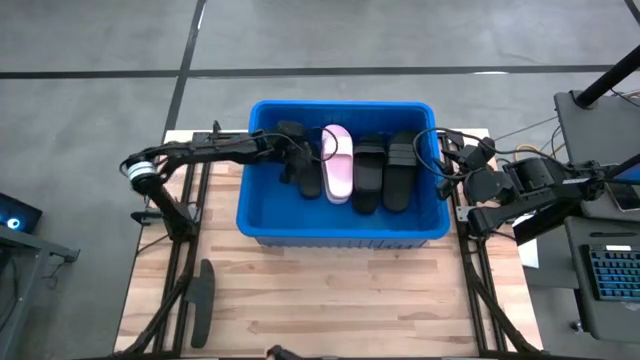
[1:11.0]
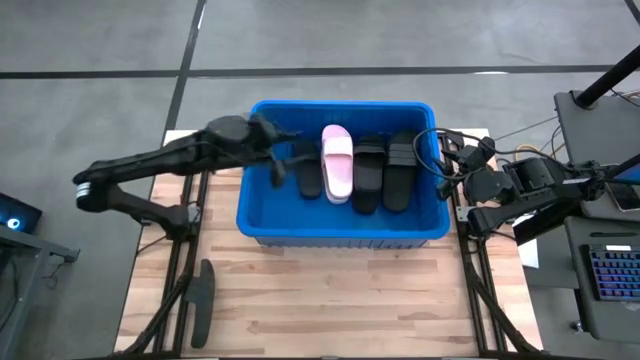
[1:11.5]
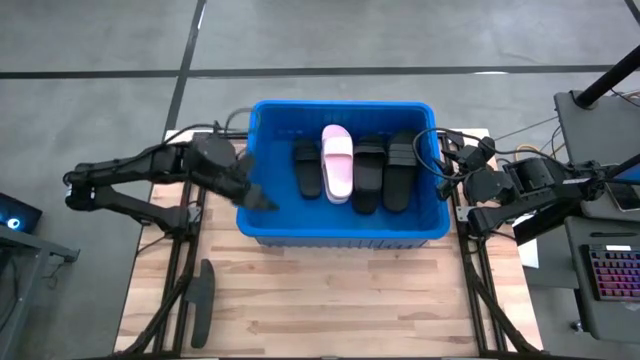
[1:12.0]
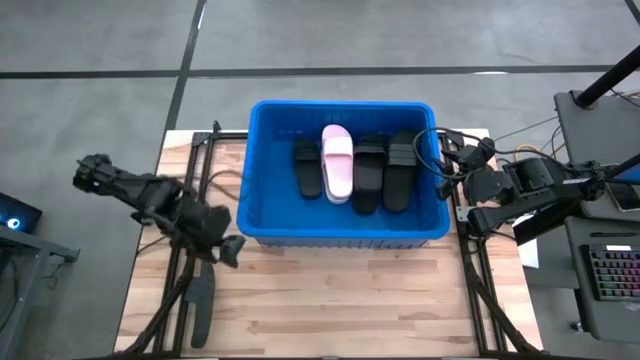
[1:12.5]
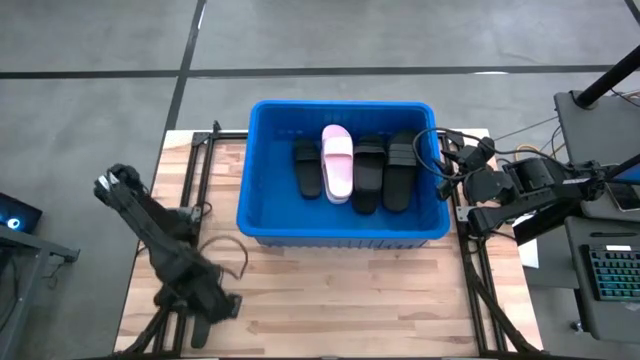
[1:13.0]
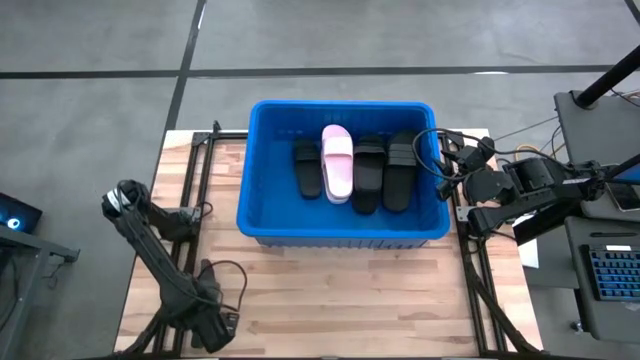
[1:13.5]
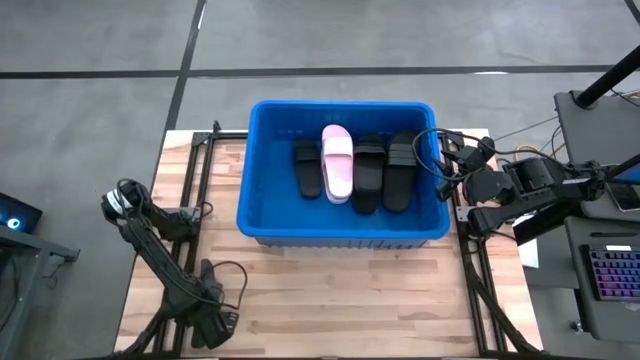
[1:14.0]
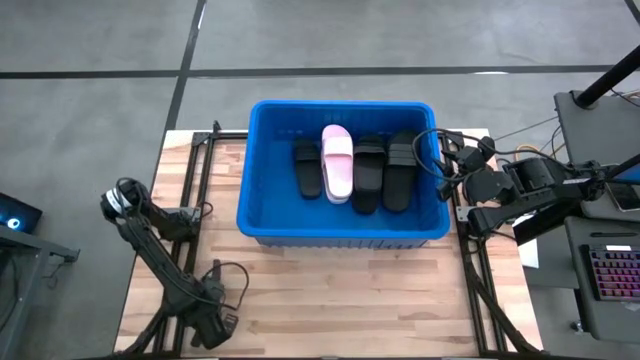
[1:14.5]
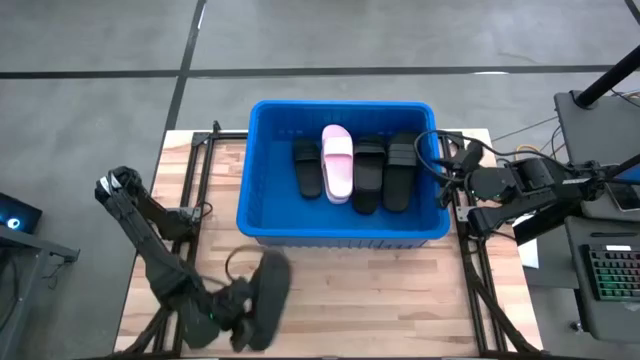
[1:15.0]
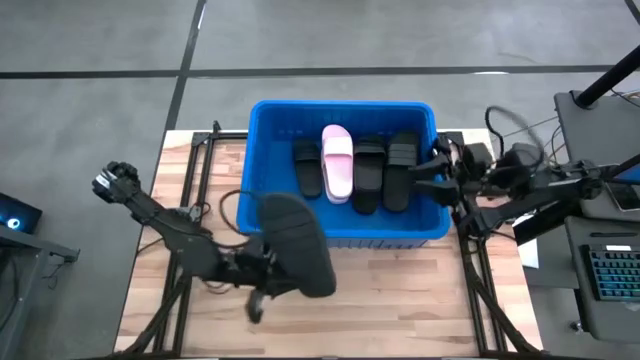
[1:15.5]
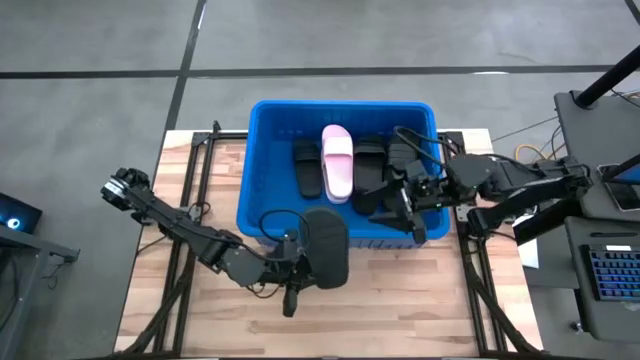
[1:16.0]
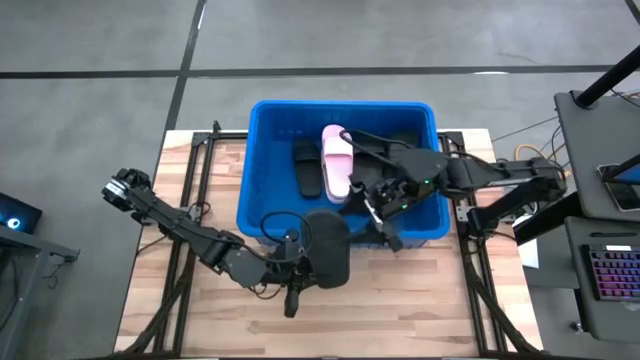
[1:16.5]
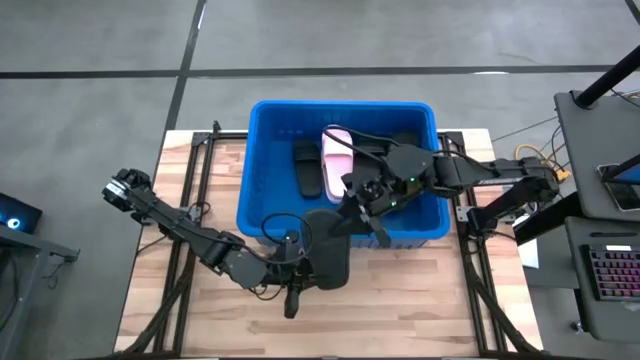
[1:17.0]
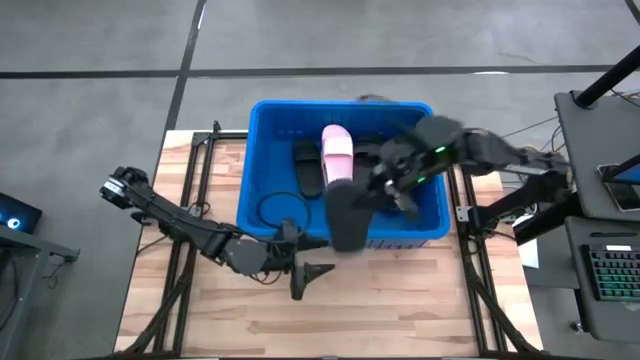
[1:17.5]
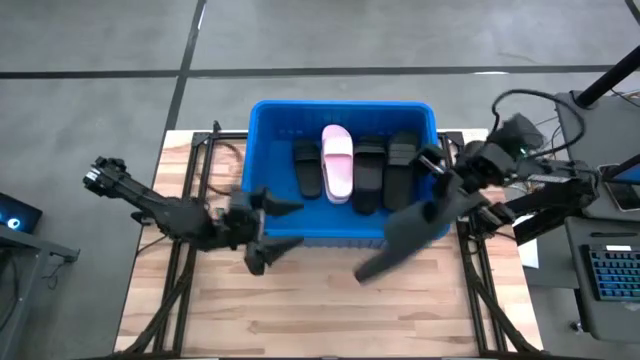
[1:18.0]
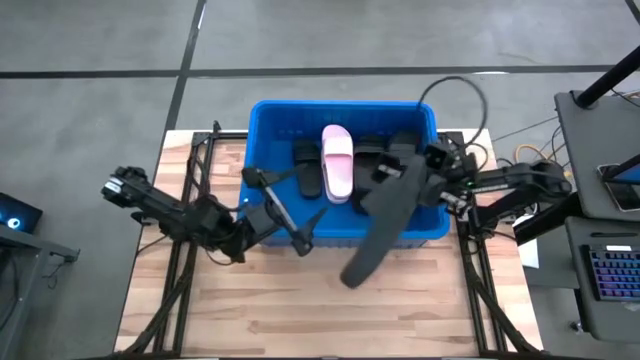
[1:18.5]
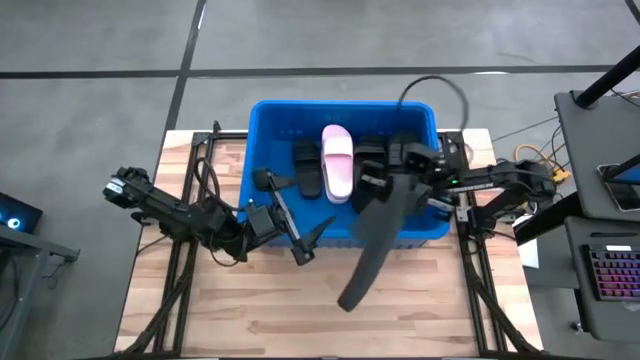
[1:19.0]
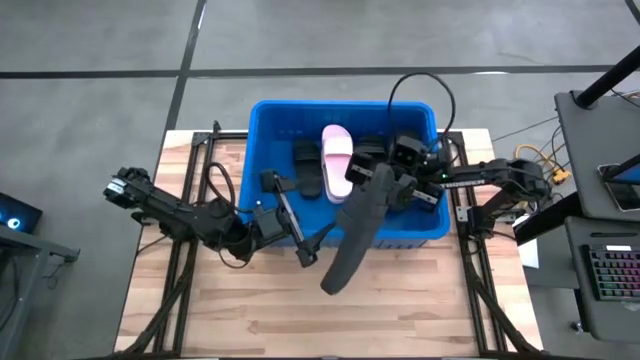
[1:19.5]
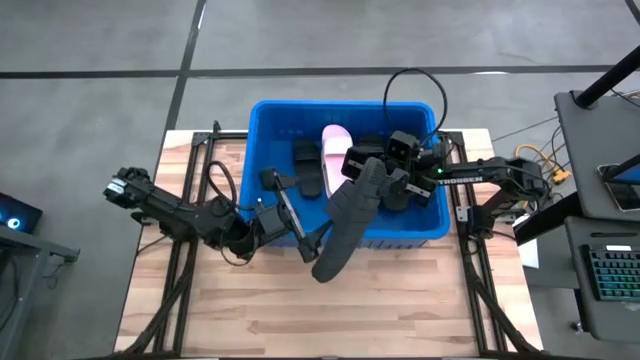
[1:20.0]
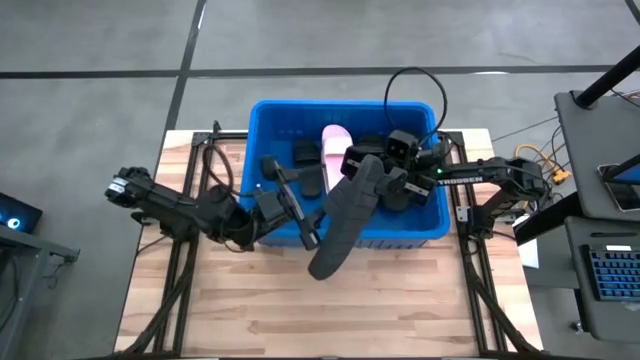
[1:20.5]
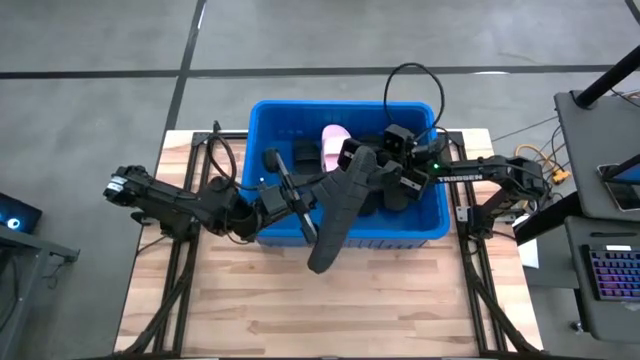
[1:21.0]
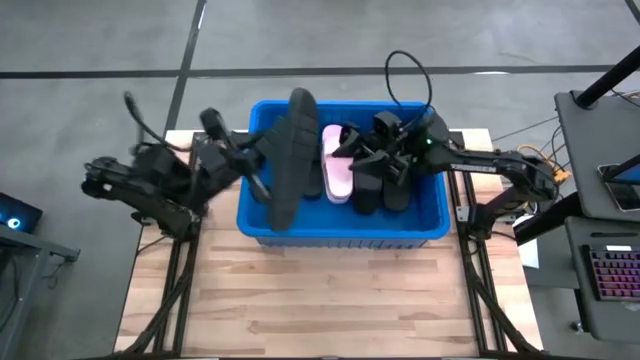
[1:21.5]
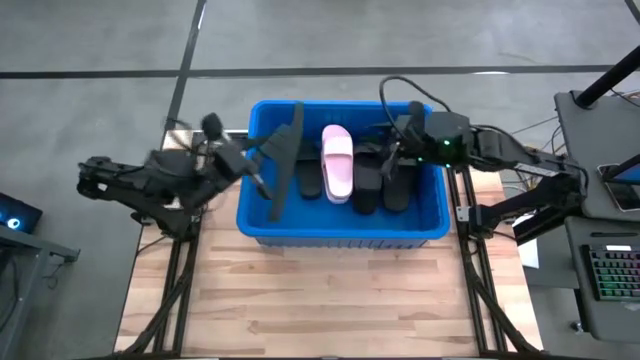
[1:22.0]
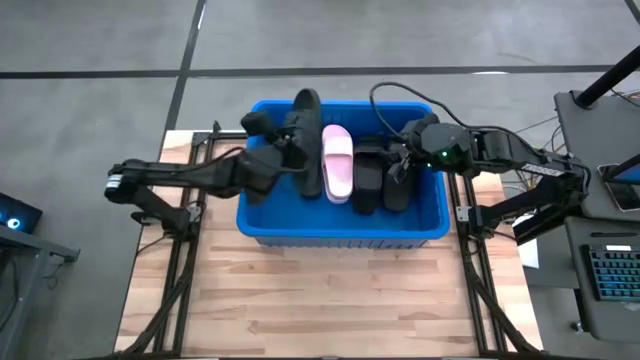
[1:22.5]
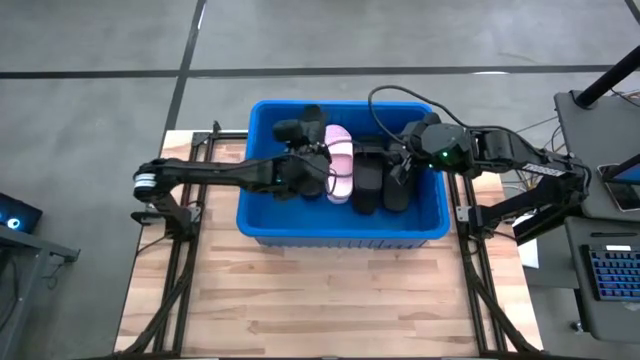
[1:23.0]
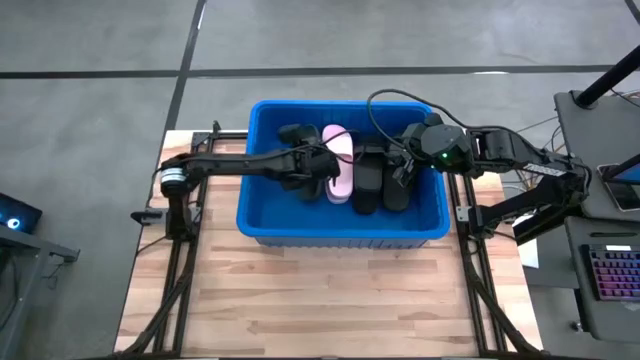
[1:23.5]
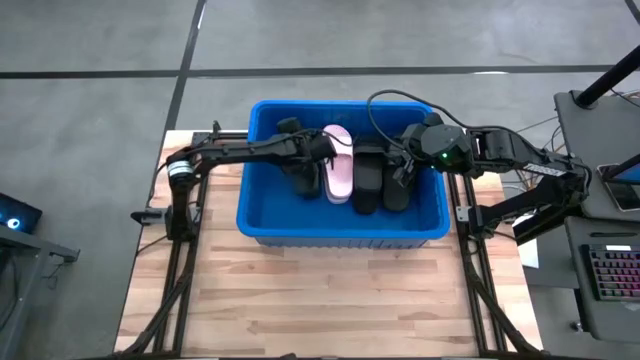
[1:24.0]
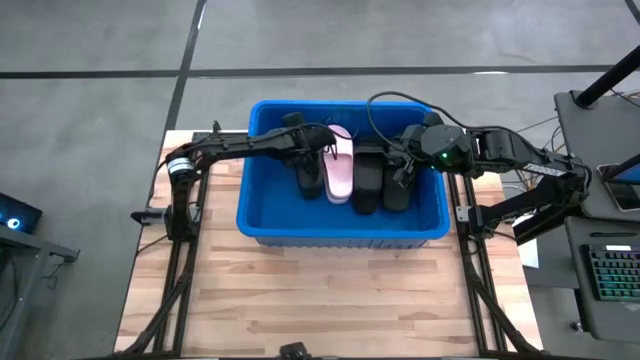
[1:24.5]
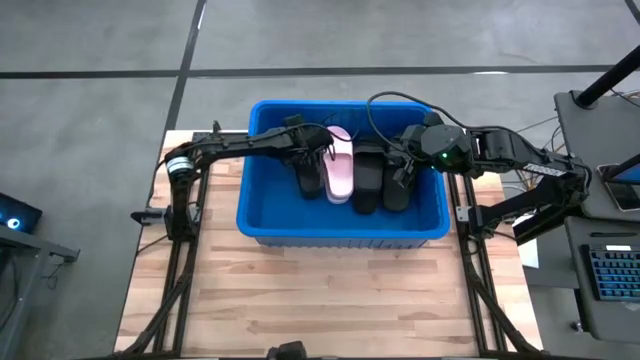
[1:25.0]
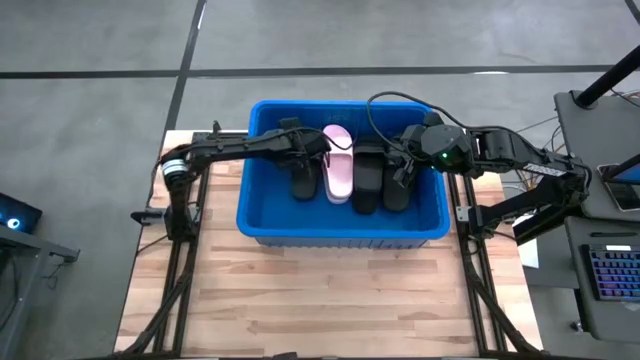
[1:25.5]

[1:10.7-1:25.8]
Task: Pick and place slides into bin
Put the black slipper into the blue bin

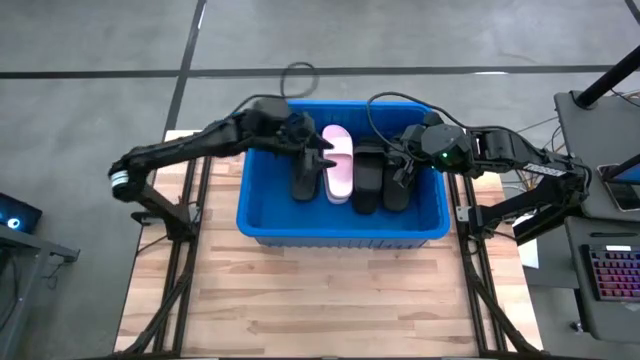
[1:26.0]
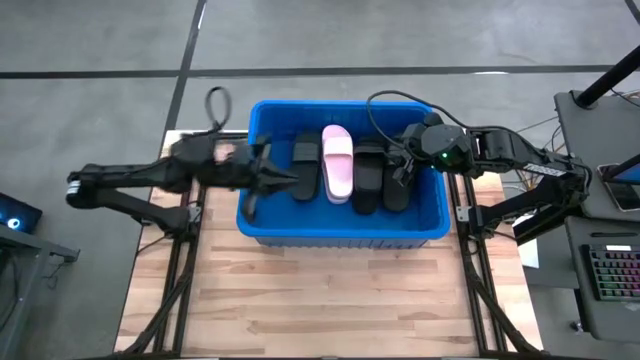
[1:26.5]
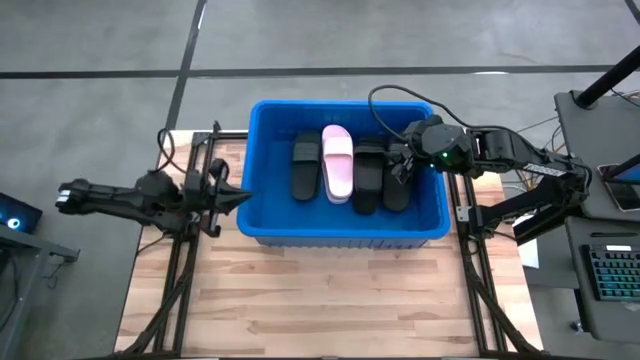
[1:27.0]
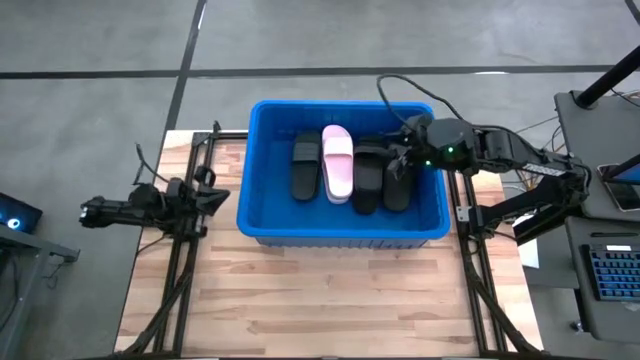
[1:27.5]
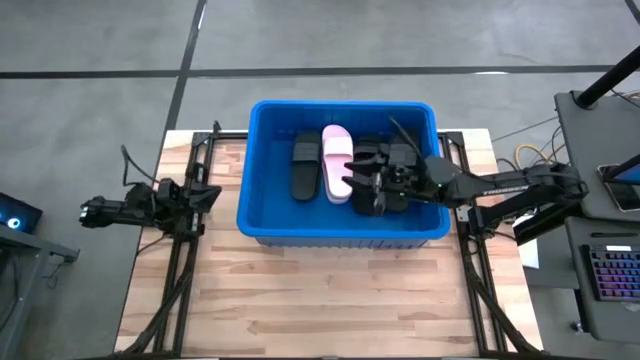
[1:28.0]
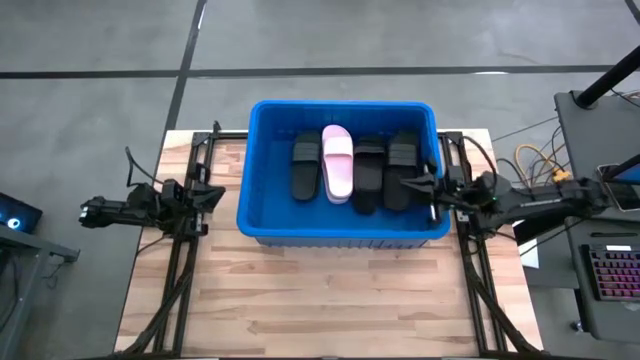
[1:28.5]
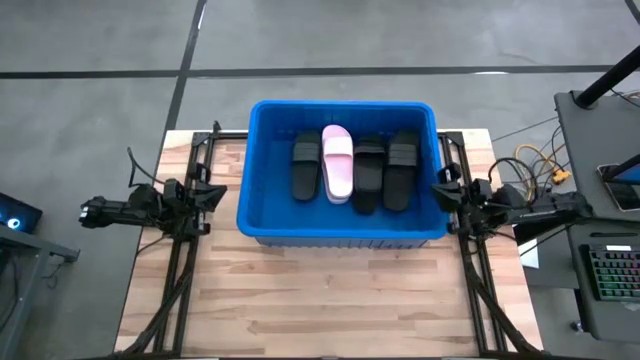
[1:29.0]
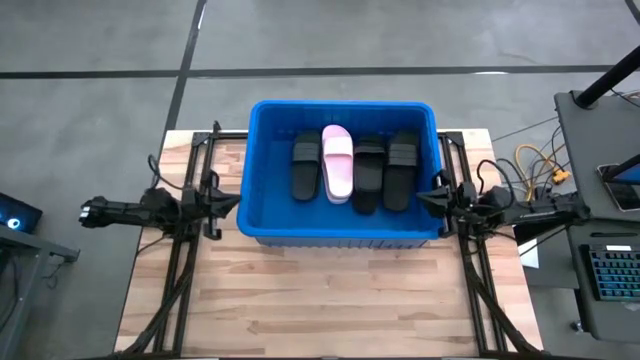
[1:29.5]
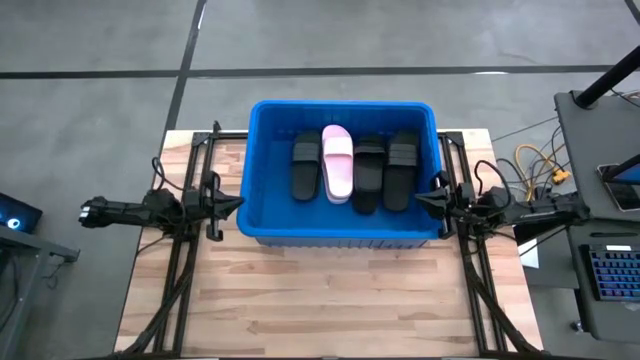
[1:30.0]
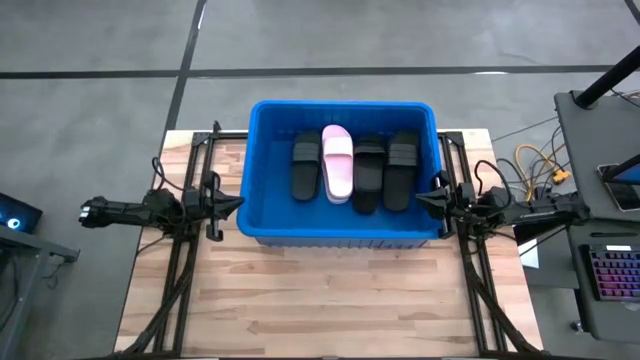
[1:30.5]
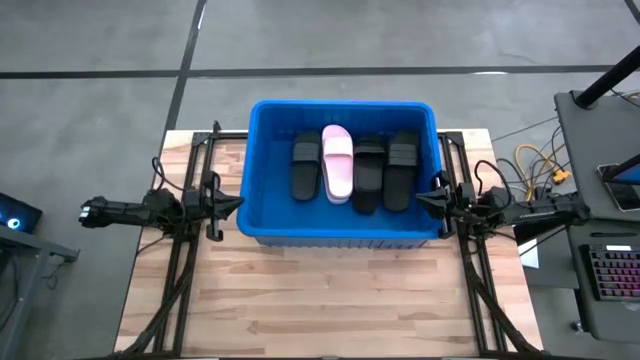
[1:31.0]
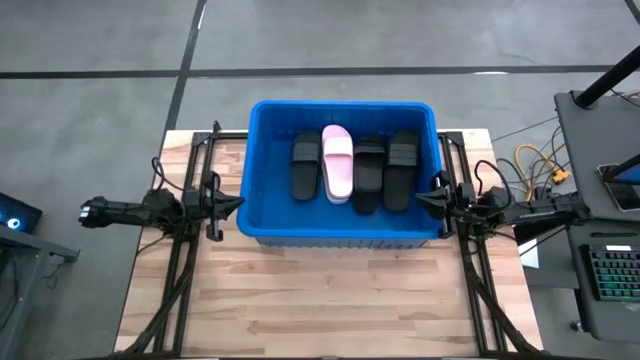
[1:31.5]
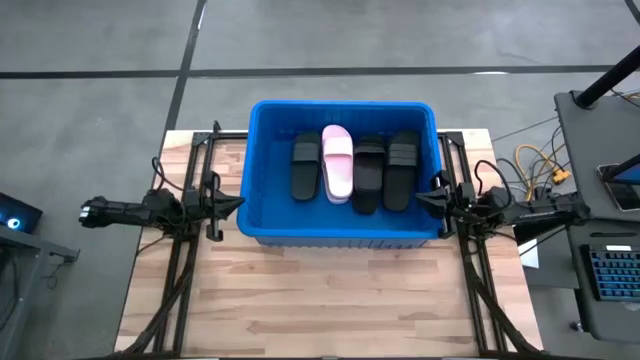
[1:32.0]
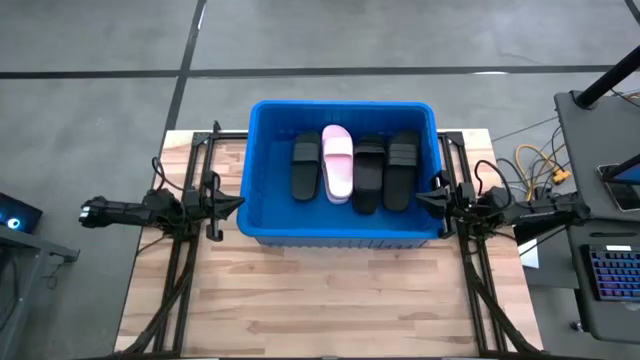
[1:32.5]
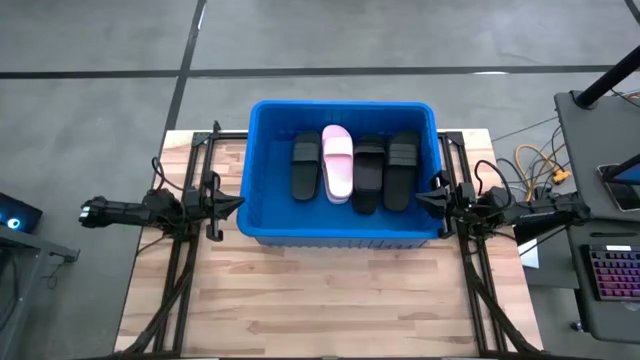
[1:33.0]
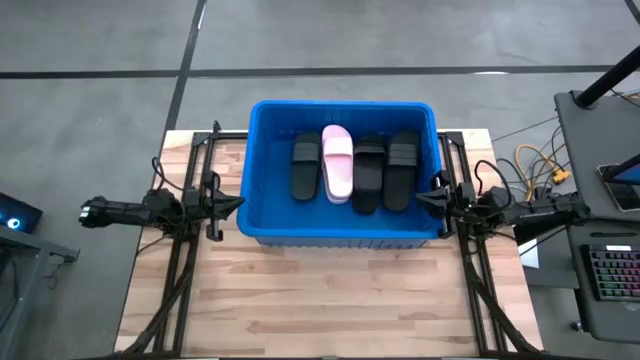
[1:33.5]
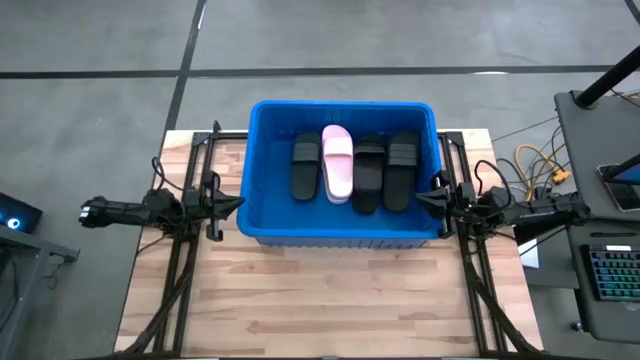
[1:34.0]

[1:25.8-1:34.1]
Return to Home Position
